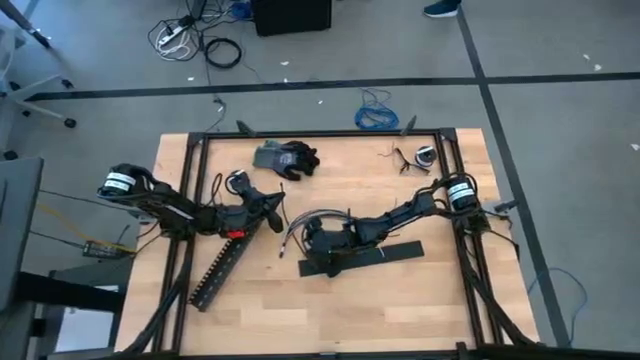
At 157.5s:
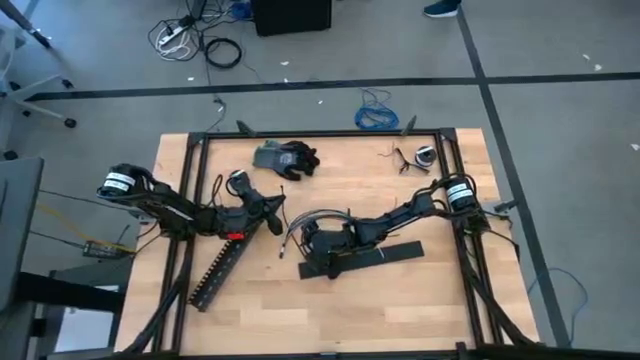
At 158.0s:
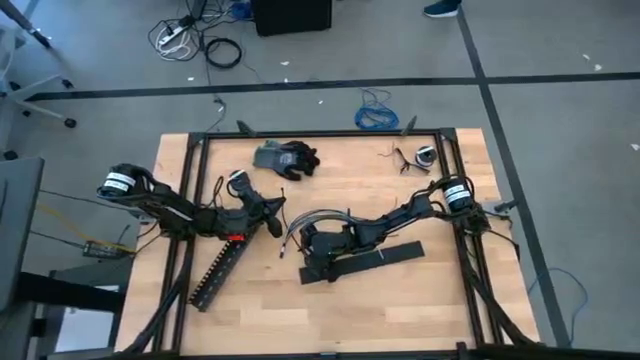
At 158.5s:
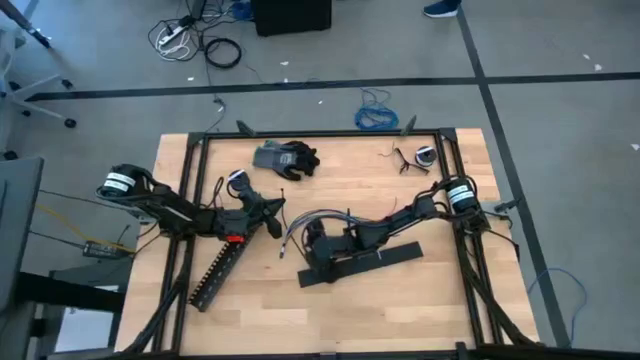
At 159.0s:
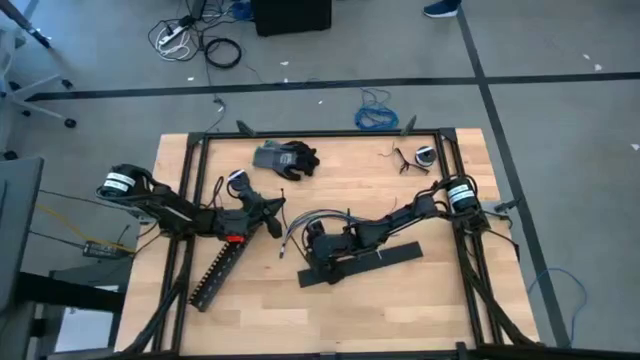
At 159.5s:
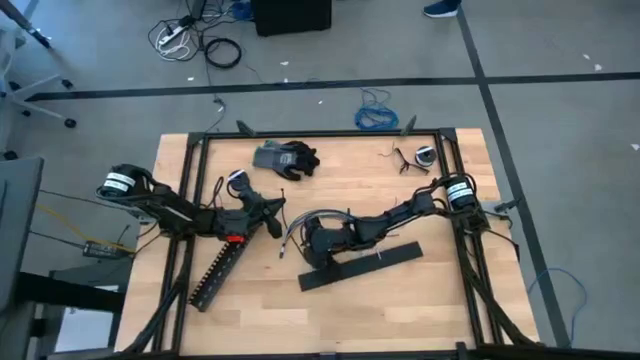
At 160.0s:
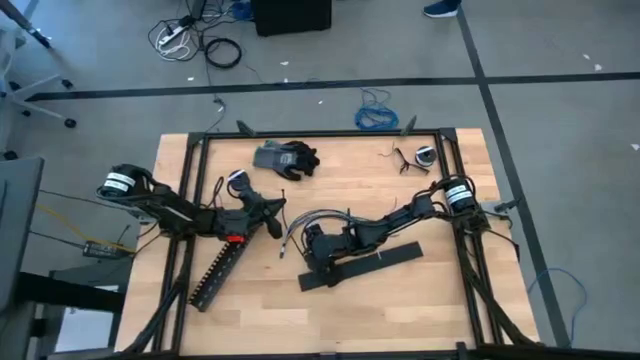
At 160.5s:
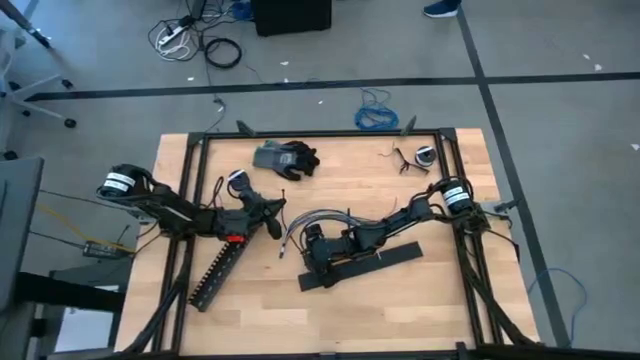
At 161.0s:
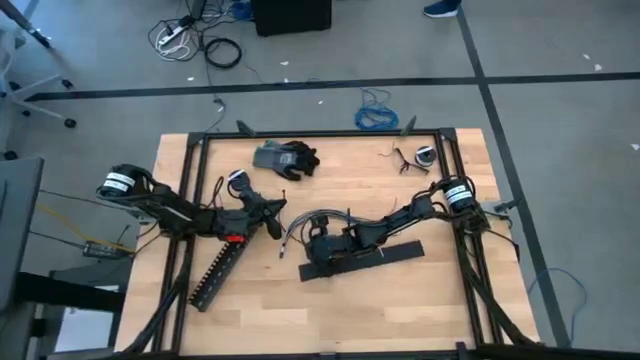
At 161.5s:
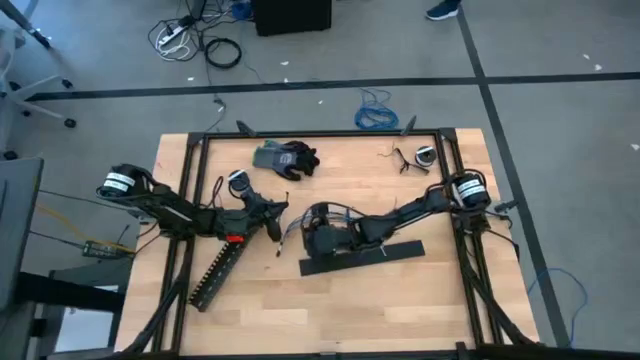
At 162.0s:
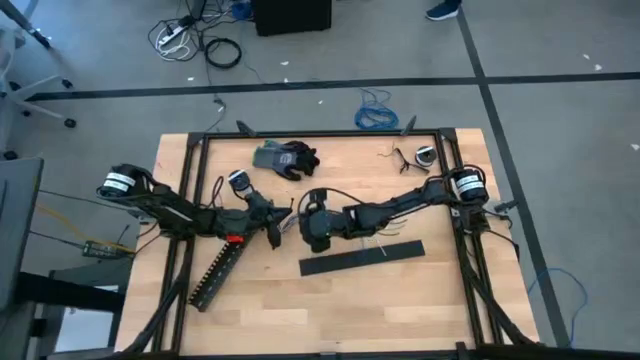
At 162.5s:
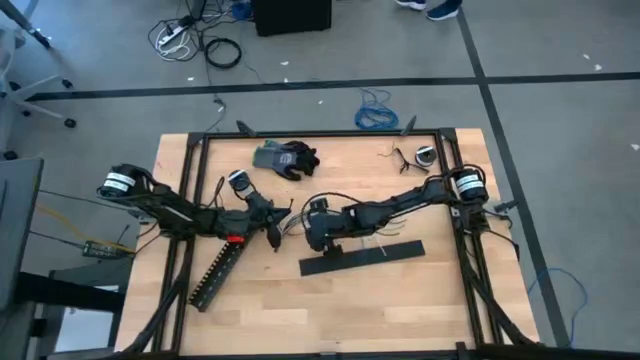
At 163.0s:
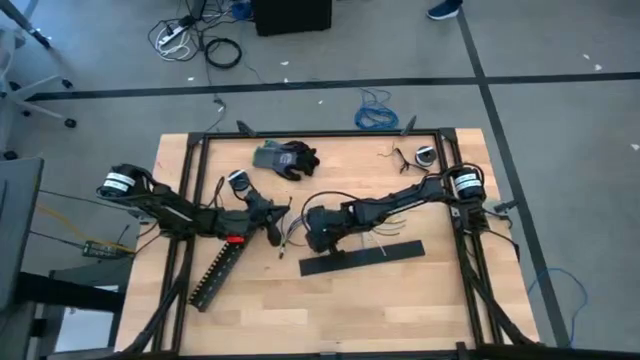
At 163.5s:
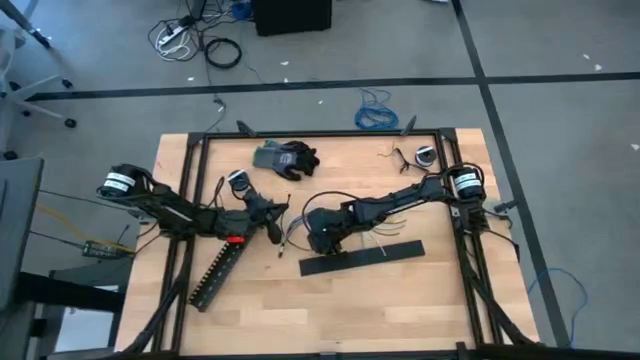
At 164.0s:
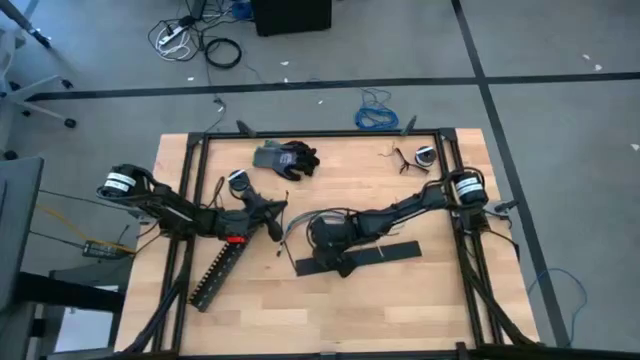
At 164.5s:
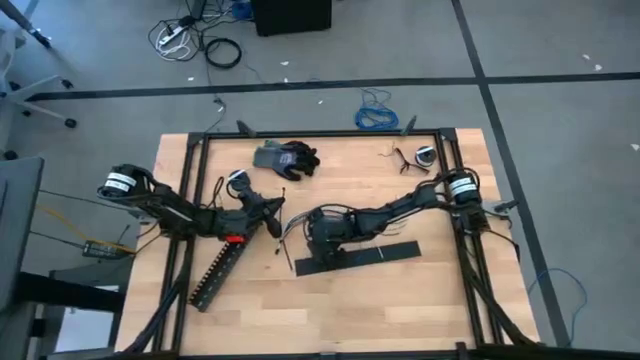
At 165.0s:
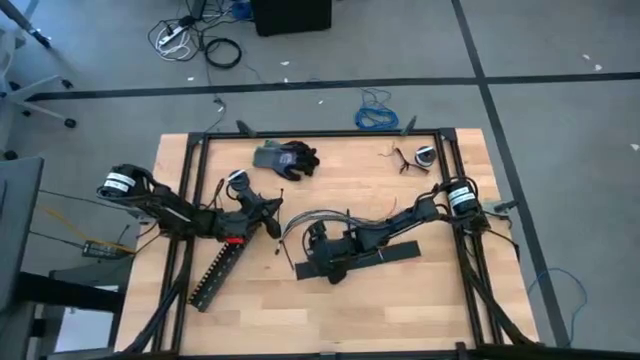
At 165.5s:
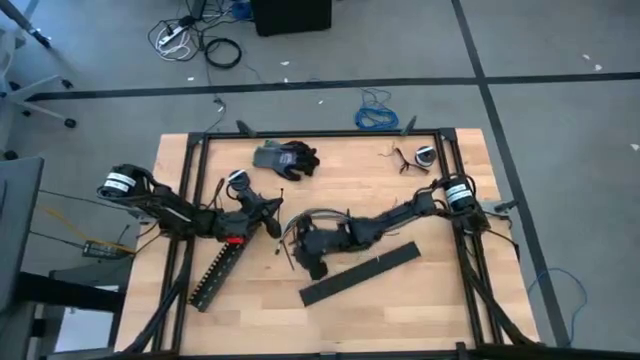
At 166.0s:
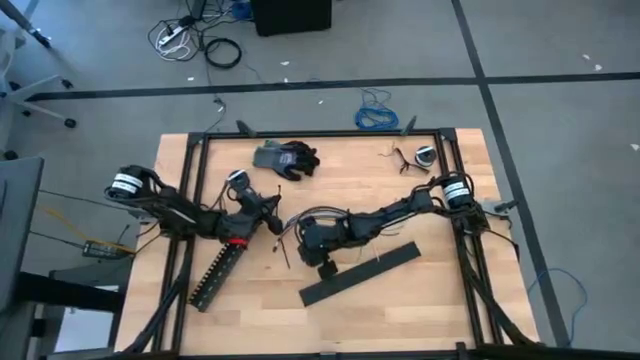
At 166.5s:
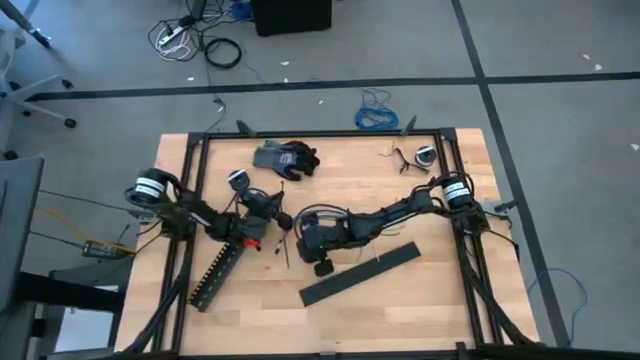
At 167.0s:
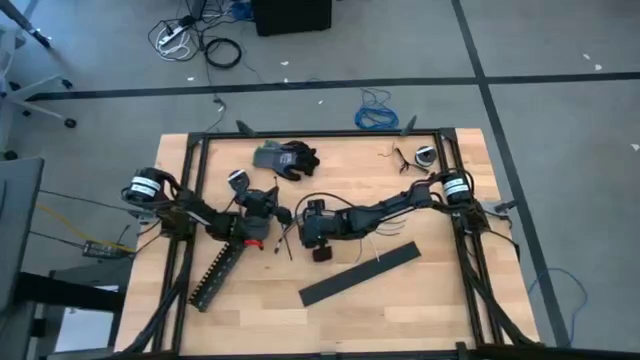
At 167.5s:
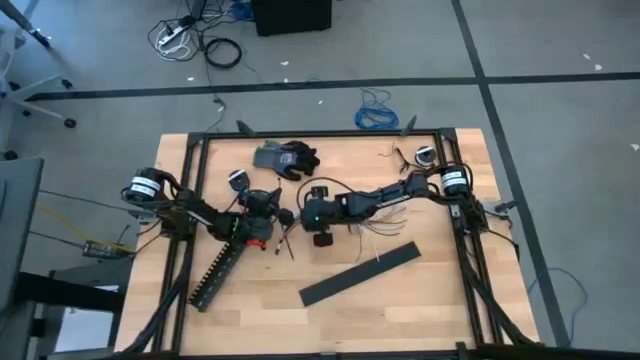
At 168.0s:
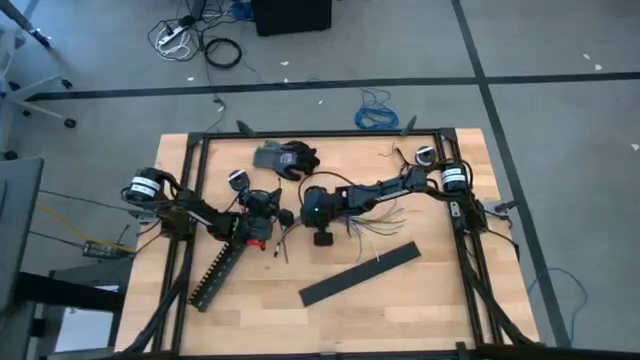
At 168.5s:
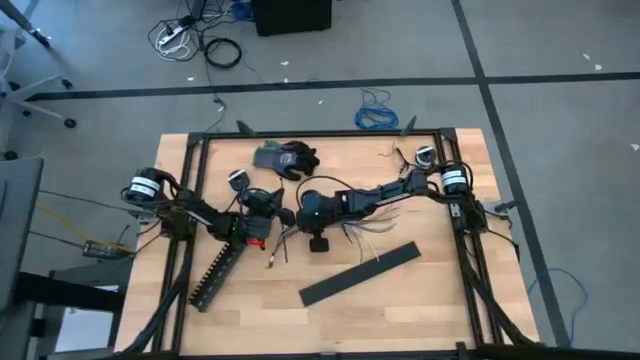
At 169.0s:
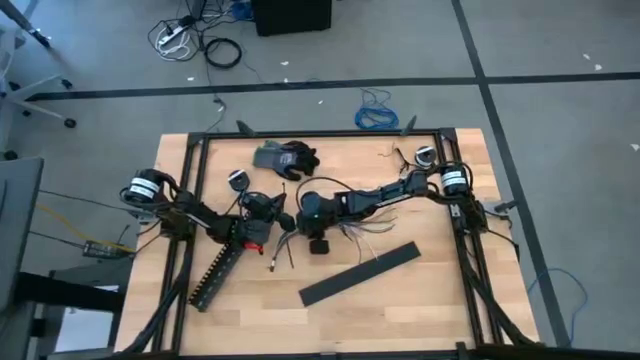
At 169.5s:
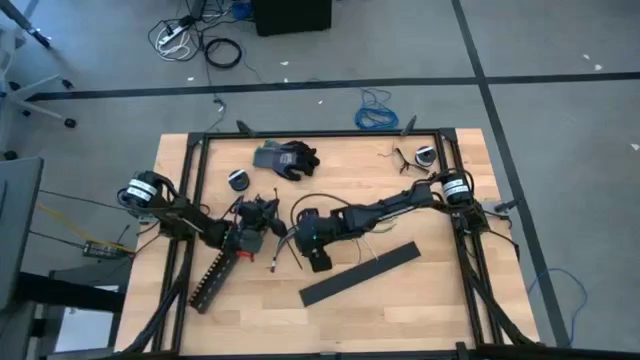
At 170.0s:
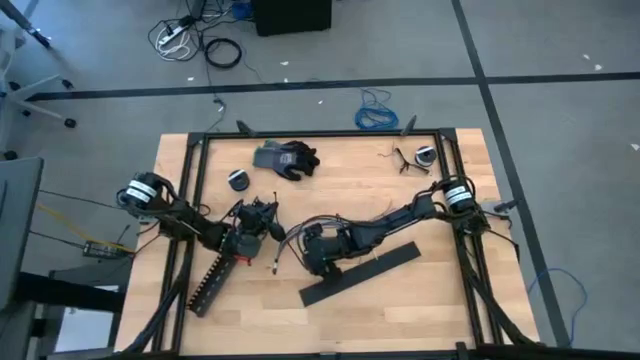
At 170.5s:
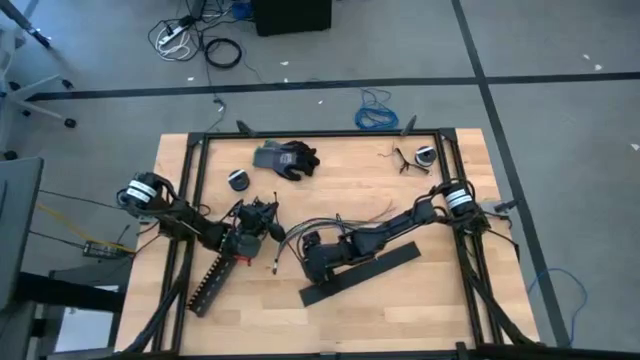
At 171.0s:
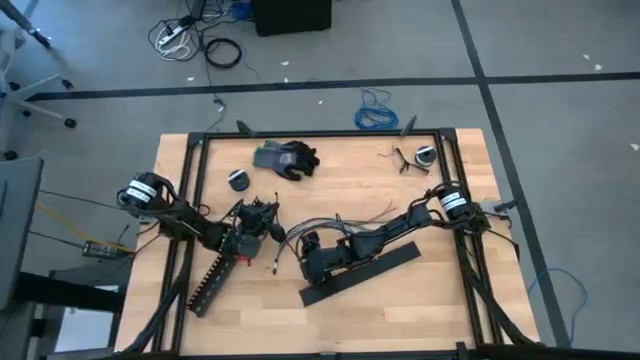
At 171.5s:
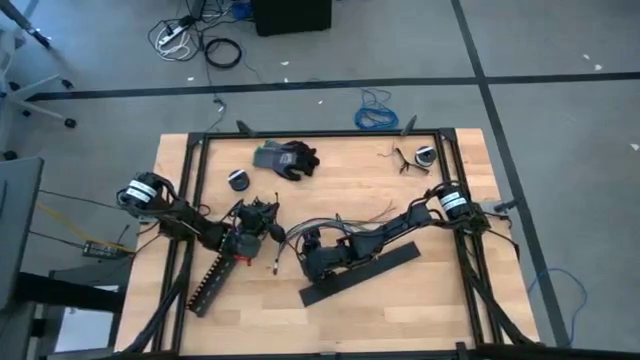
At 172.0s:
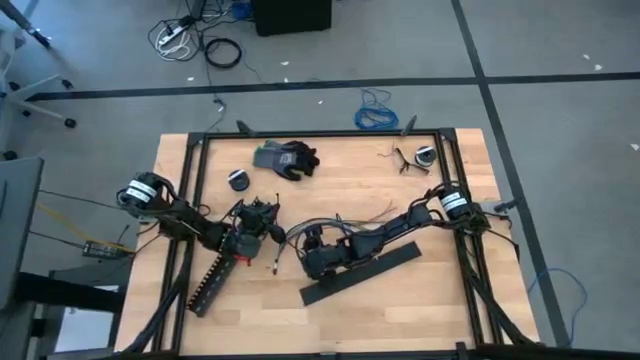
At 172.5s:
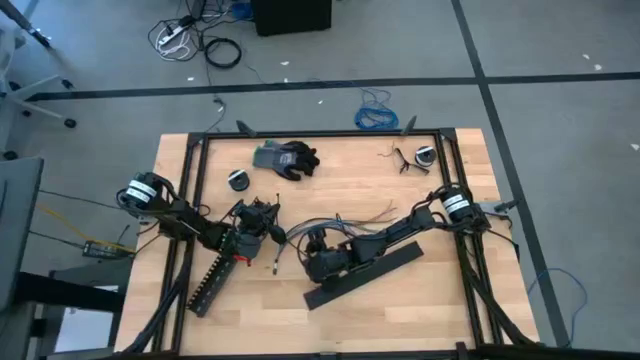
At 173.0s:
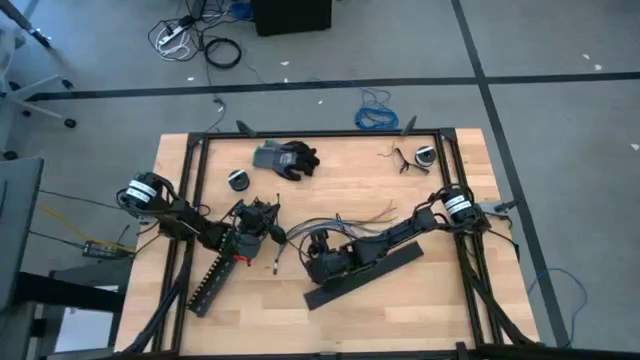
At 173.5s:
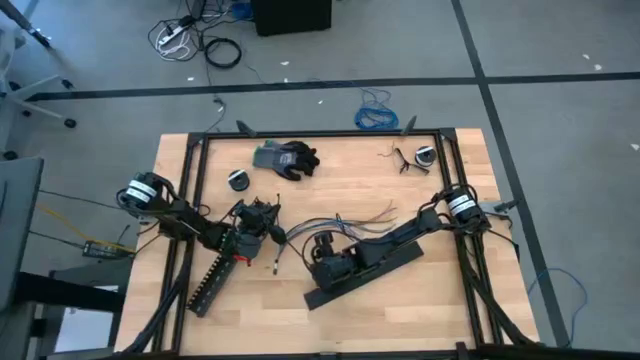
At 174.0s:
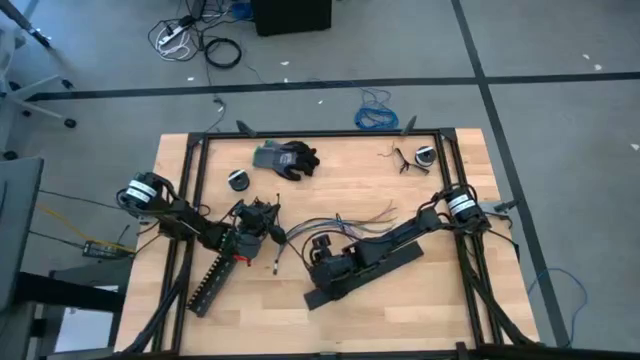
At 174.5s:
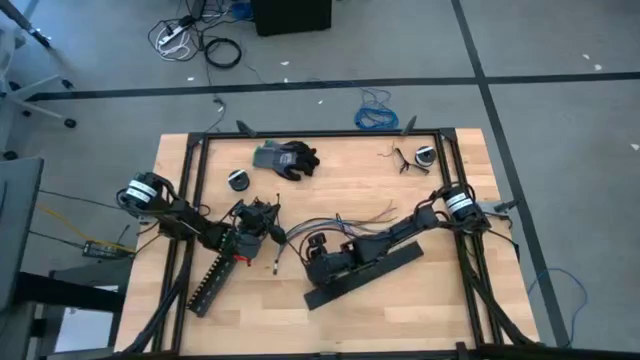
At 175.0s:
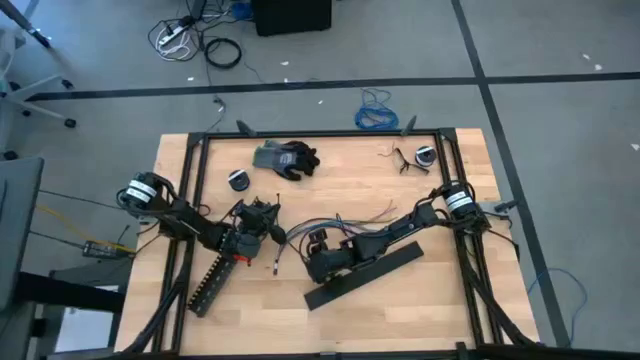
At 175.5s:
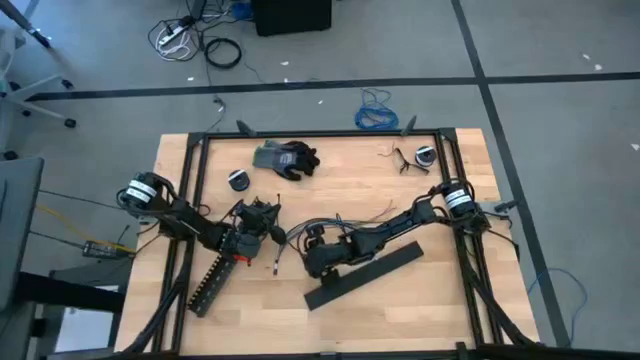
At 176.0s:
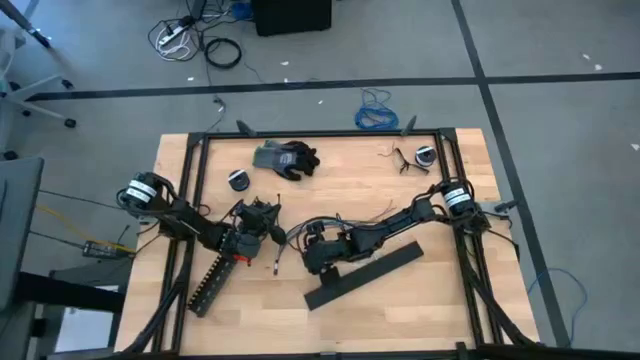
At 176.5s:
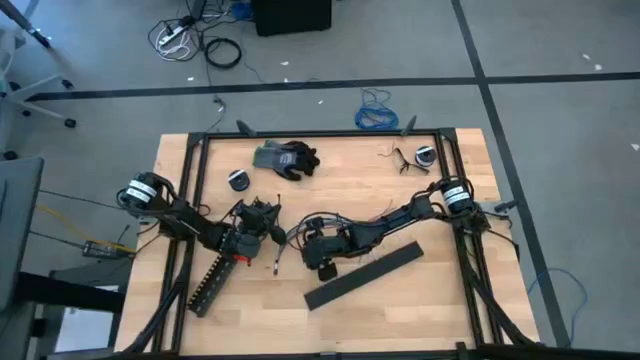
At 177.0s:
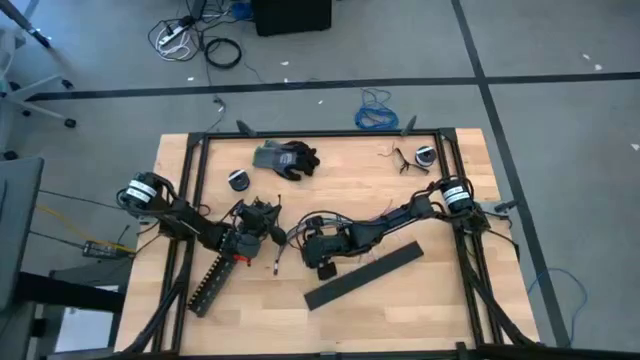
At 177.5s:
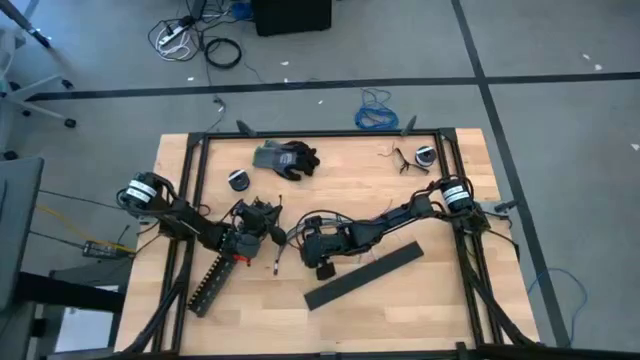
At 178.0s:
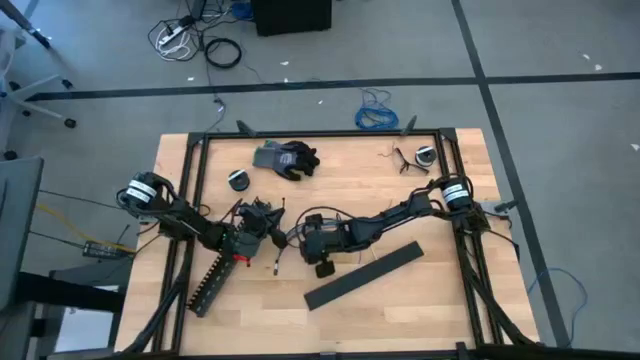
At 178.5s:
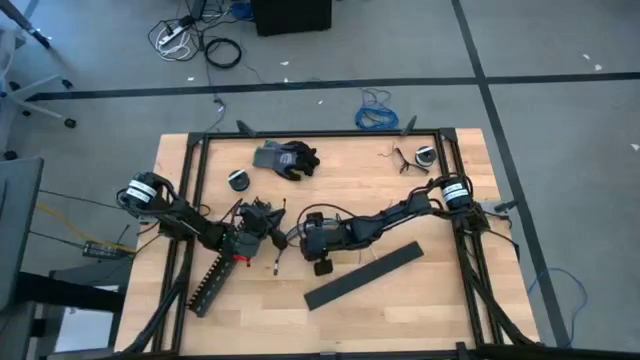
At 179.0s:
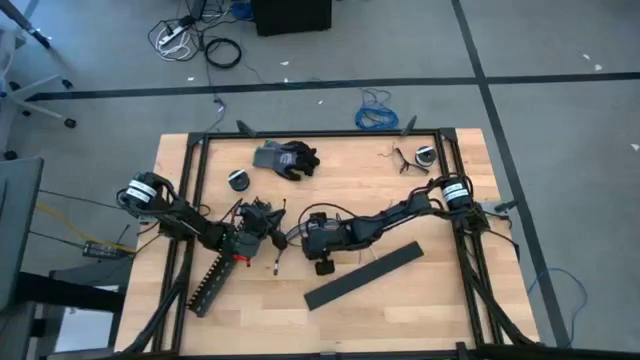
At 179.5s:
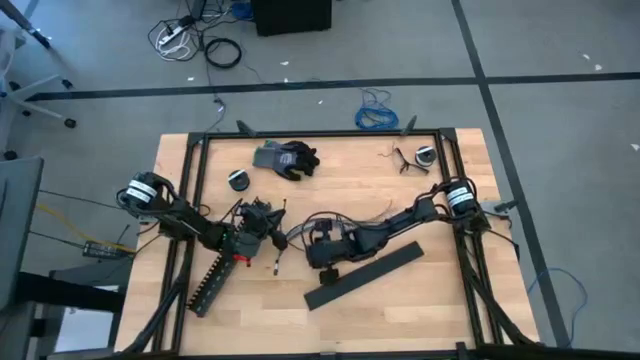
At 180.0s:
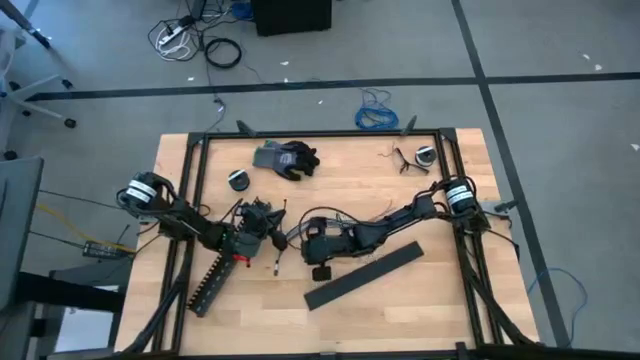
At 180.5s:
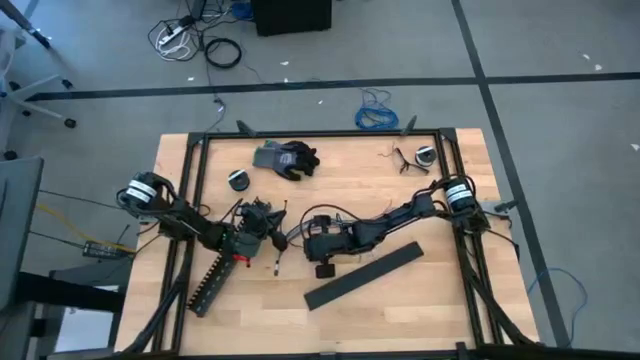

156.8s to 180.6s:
Task: Ziptie cables
Wrap the other black zip tie on the cable wires
